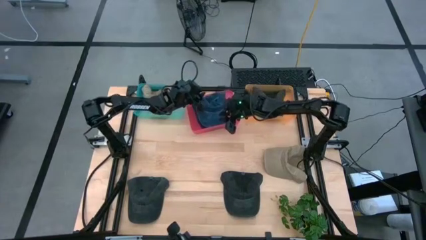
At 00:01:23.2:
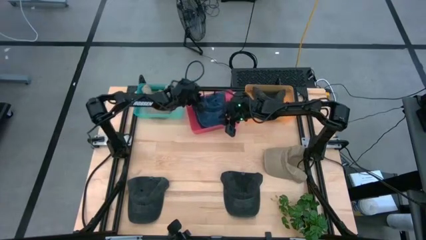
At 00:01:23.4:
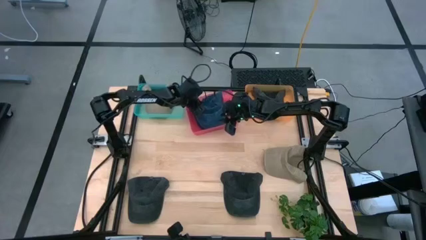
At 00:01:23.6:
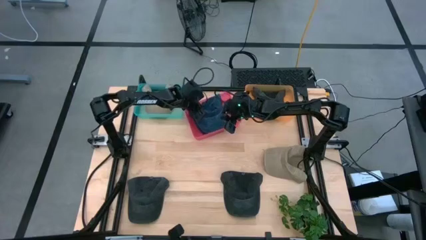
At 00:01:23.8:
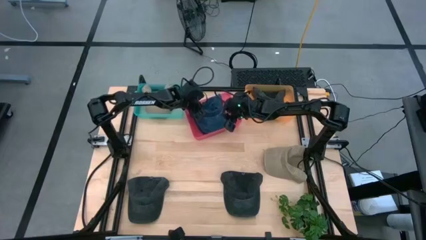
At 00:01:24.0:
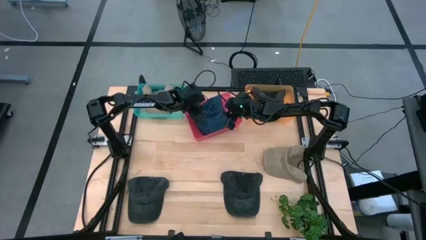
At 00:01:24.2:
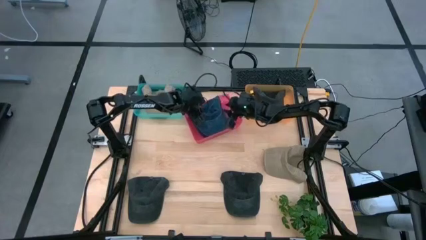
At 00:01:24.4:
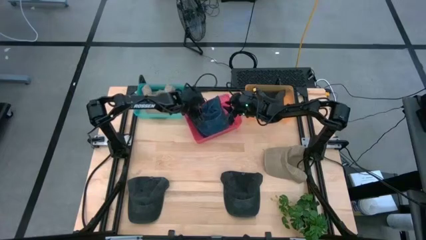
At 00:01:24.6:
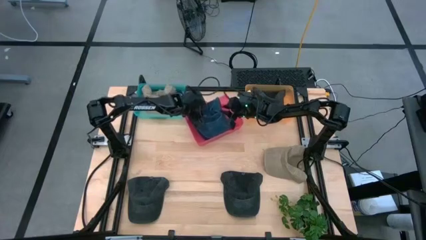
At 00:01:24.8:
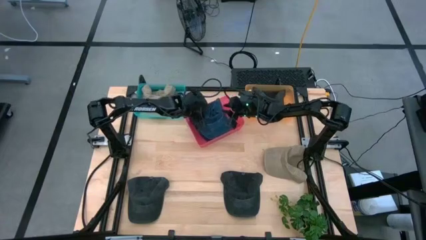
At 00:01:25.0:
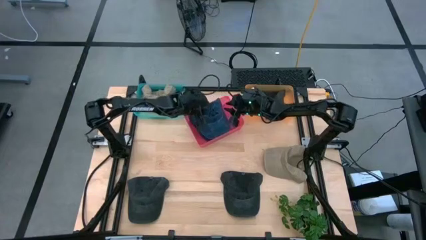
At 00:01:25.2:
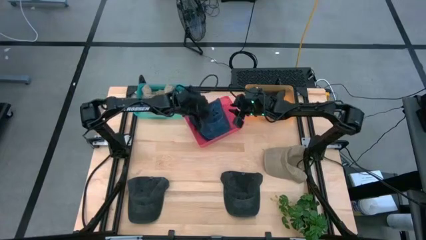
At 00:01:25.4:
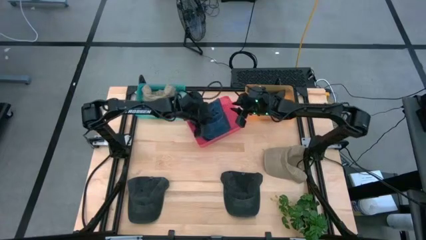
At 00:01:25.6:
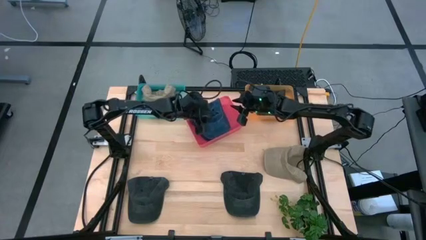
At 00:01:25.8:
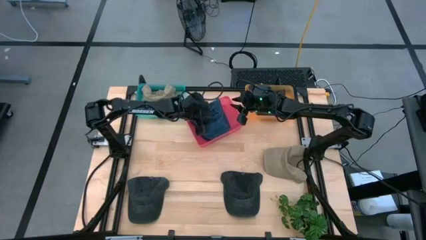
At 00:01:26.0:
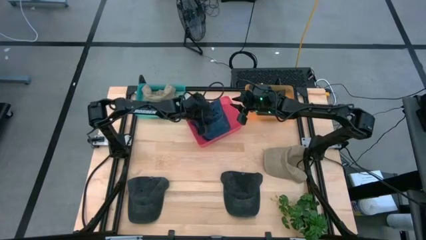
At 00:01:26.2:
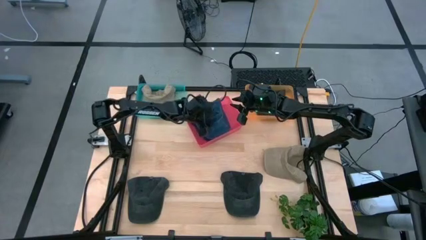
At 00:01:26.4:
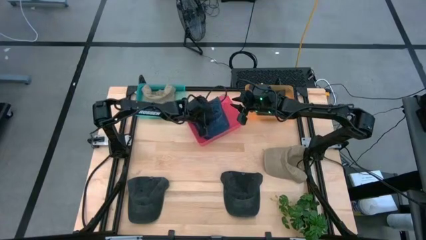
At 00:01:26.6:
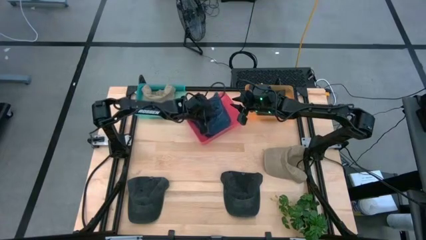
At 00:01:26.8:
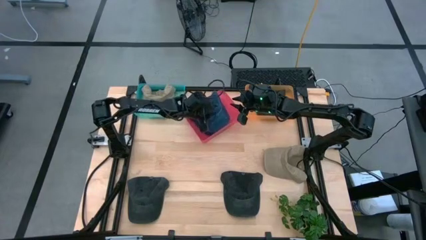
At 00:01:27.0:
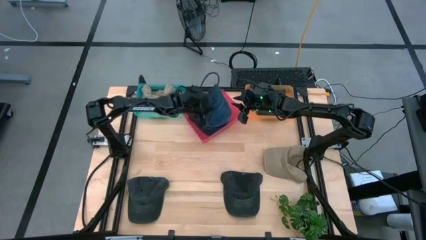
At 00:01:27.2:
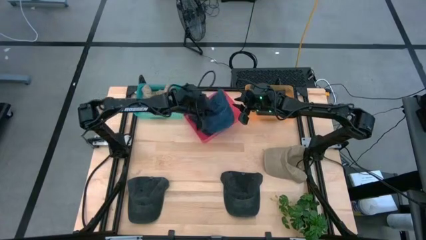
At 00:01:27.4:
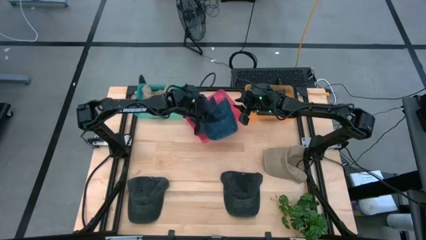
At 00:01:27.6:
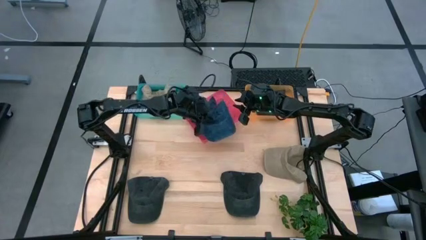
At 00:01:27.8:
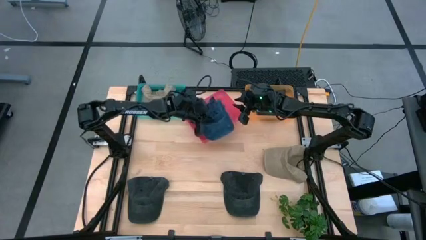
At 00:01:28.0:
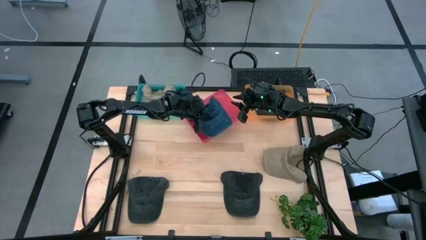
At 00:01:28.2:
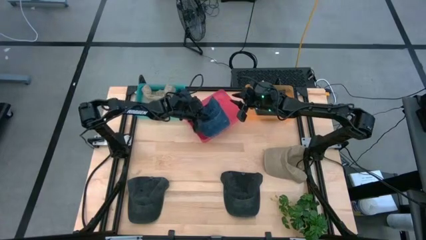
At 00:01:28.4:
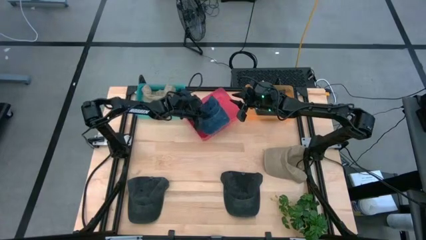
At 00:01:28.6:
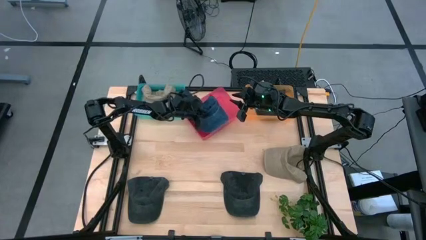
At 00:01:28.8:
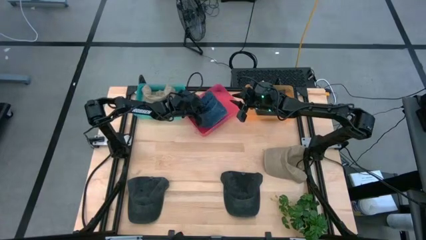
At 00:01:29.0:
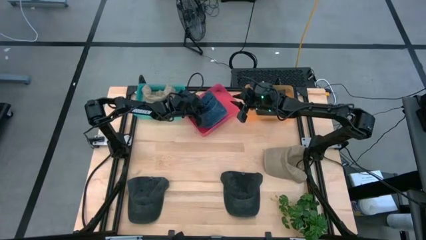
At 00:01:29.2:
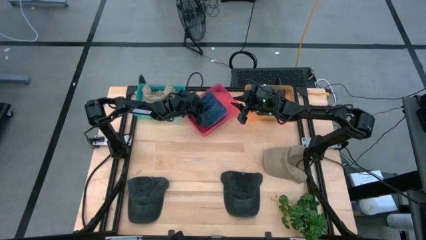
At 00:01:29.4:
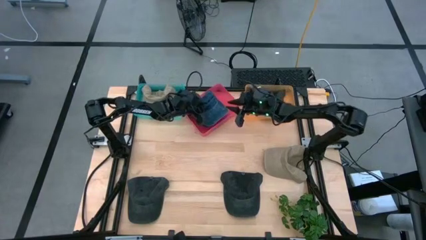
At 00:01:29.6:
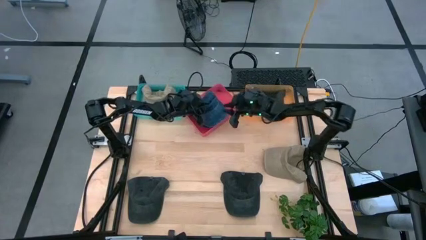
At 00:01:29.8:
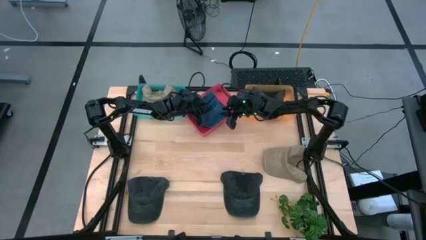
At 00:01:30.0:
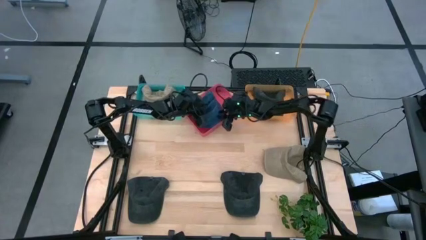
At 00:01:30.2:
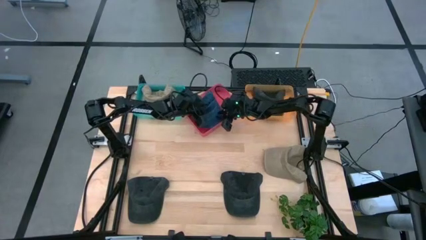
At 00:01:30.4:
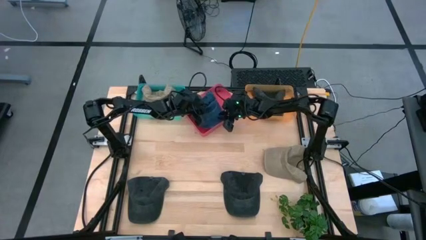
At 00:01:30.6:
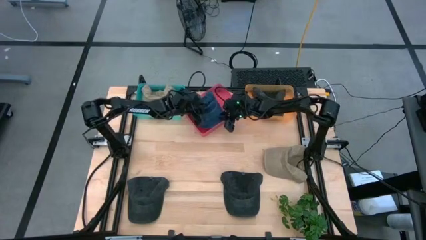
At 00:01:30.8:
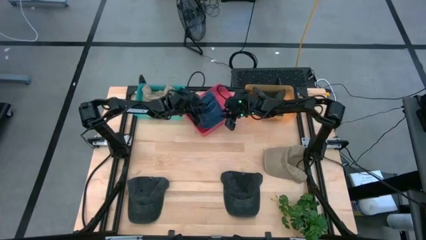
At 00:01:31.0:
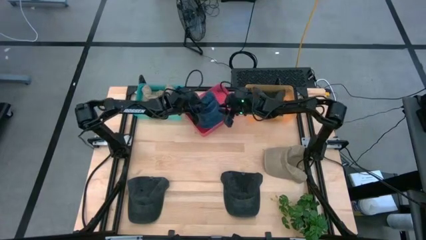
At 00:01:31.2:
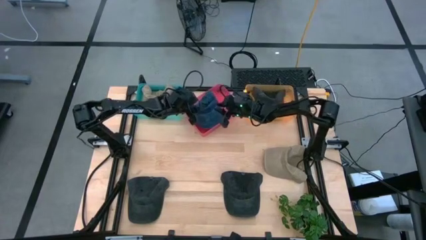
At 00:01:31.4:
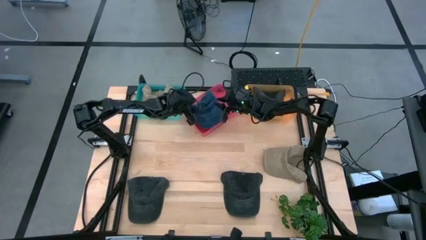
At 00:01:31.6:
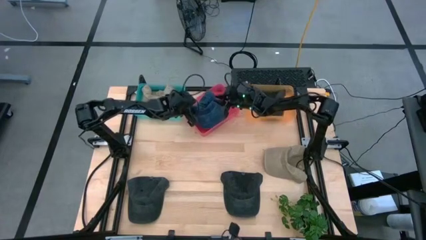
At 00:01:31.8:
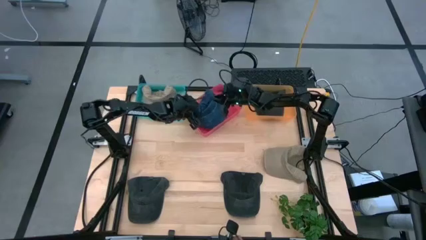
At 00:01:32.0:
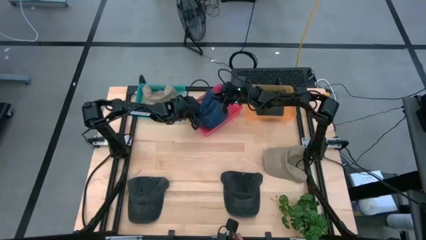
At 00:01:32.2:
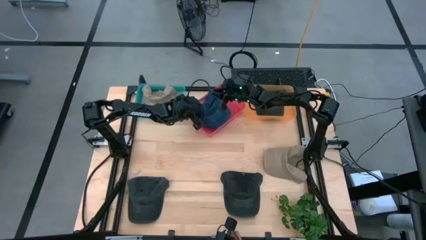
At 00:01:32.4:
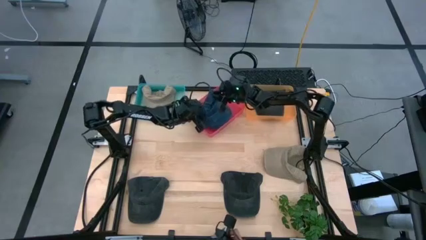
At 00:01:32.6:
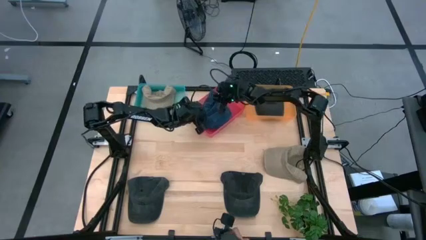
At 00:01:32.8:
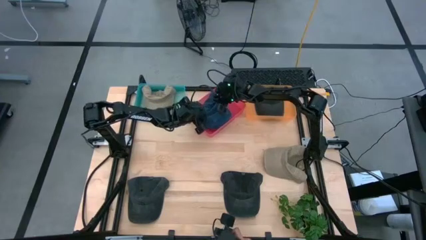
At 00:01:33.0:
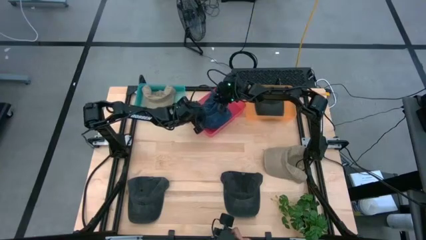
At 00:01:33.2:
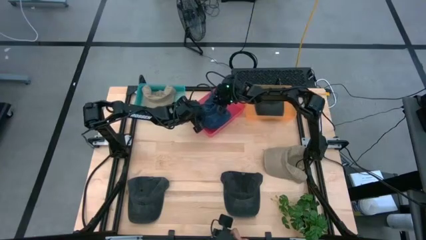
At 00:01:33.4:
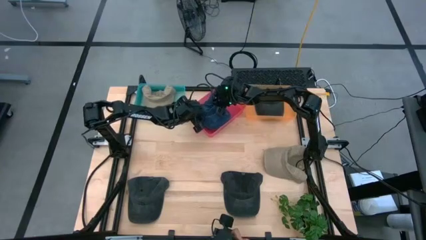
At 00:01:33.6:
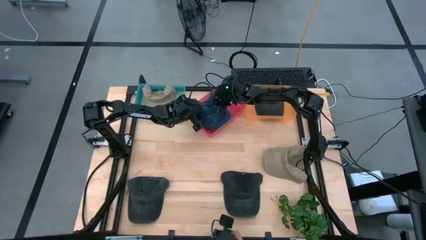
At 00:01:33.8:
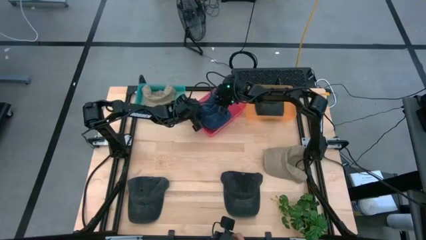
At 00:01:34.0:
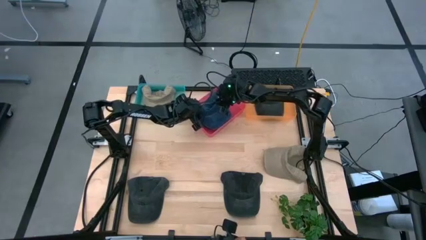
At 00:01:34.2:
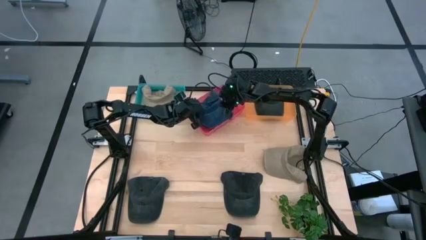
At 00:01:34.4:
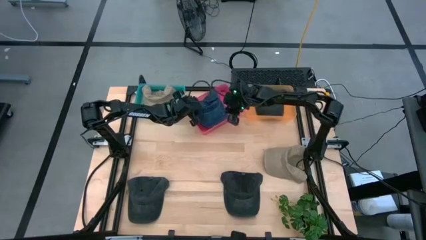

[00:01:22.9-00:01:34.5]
Task: Pick & Place hat
Put the blue cap into the red bin

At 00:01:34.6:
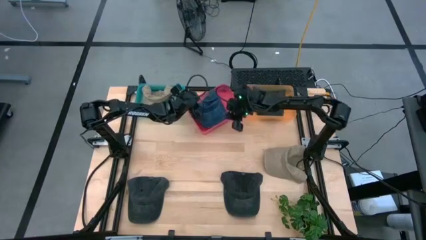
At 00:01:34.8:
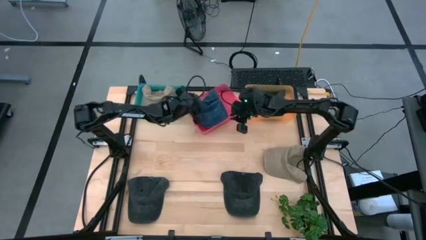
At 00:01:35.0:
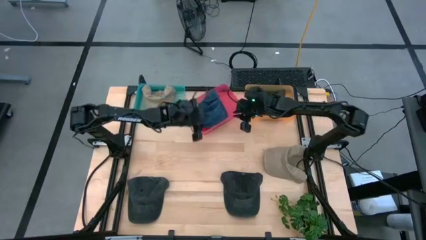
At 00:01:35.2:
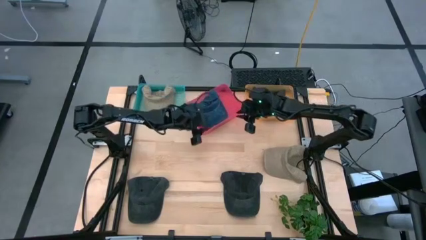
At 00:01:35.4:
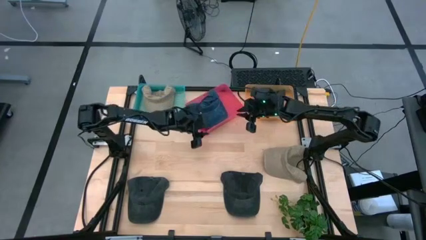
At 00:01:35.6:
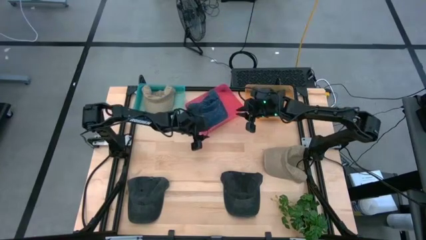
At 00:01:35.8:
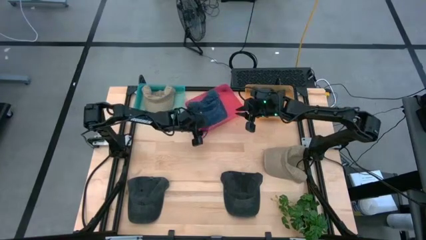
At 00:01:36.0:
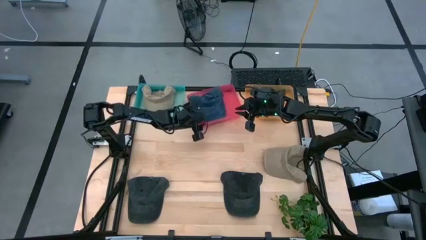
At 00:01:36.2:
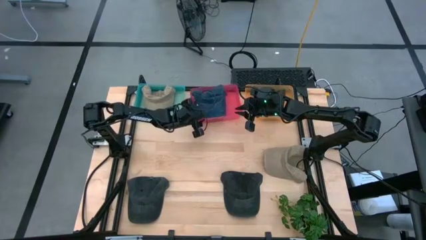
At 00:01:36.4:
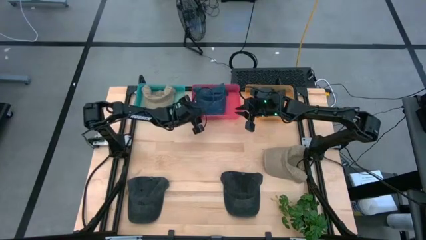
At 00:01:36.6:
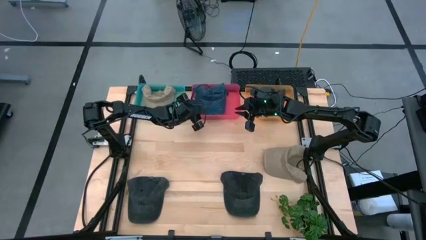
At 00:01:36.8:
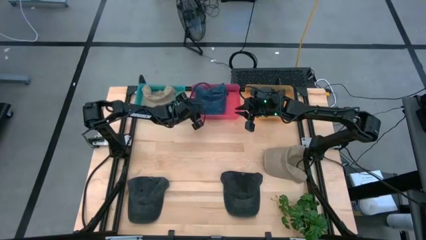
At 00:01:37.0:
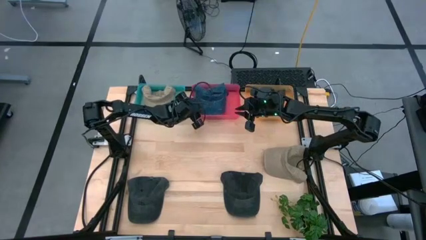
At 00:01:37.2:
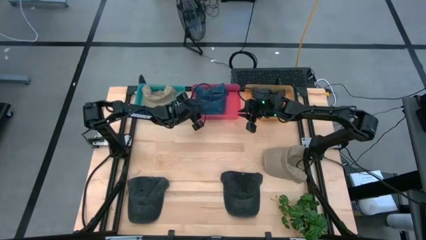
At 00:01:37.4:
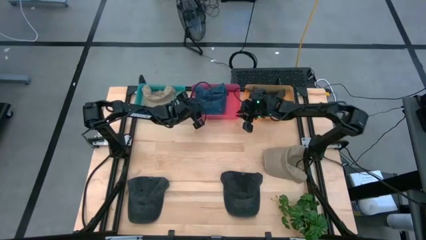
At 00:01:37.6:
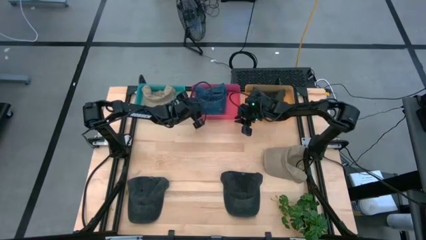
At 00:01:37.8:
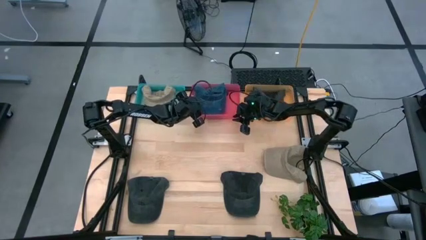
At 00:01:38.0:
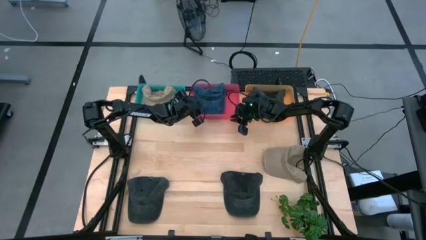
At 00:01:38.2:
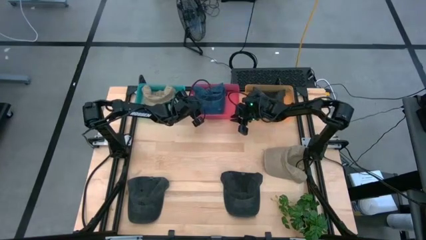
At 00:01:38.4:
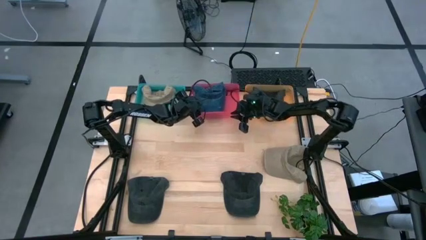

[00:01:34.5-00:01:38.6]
Adjust the red bin
